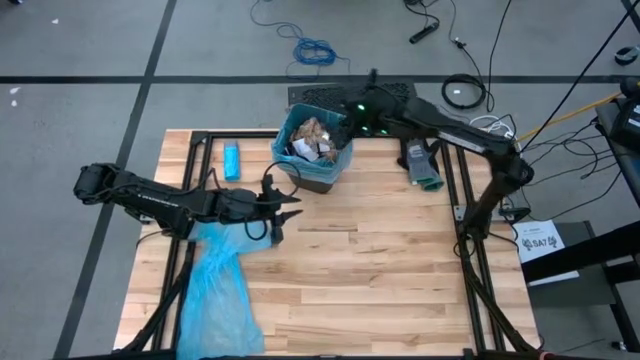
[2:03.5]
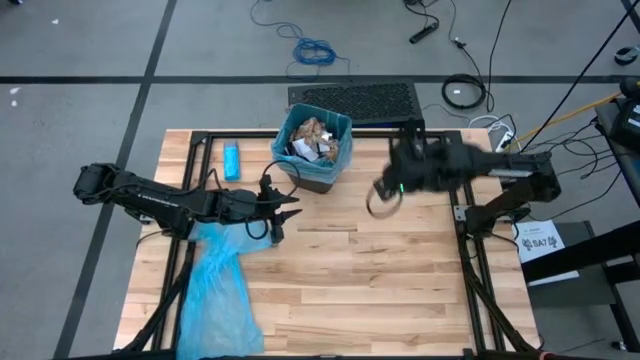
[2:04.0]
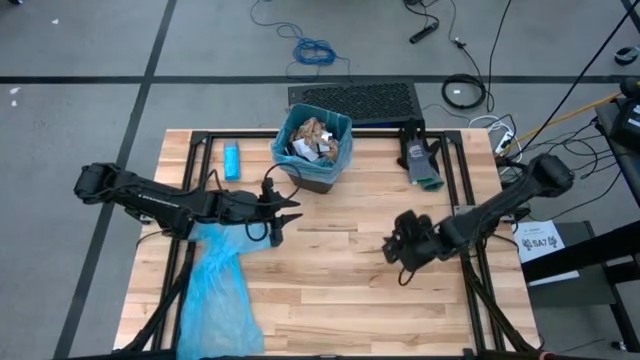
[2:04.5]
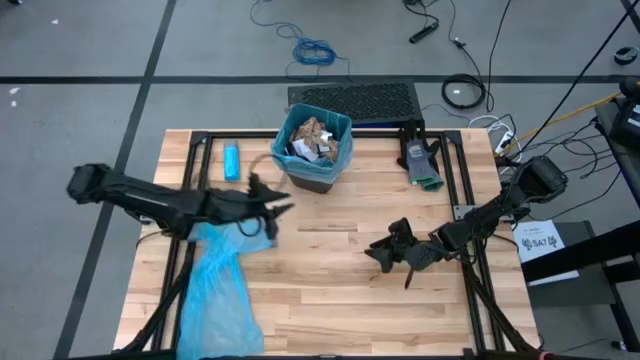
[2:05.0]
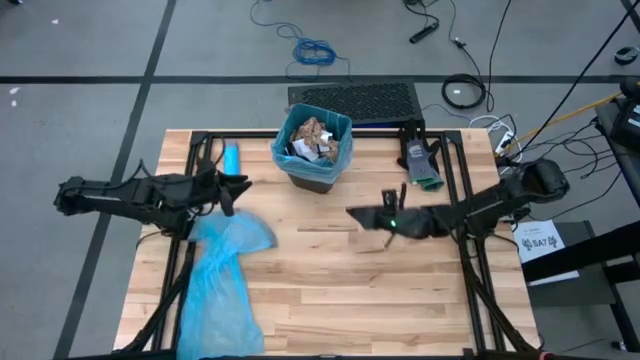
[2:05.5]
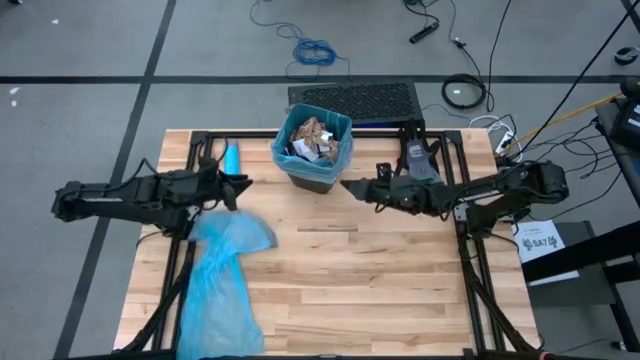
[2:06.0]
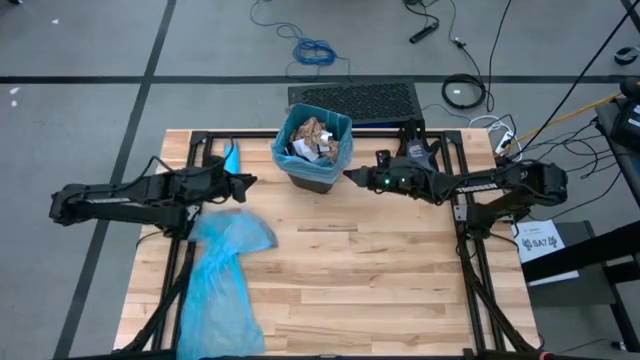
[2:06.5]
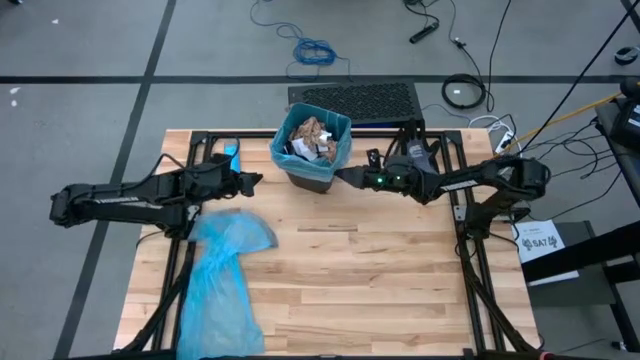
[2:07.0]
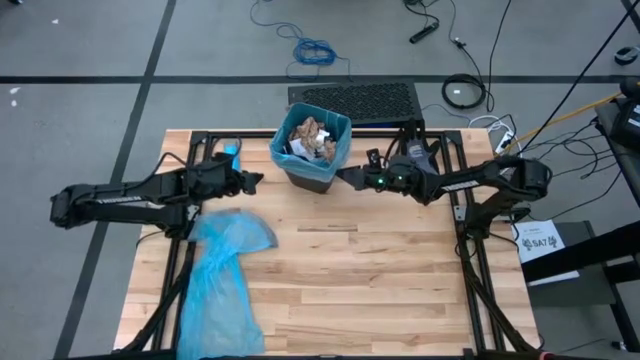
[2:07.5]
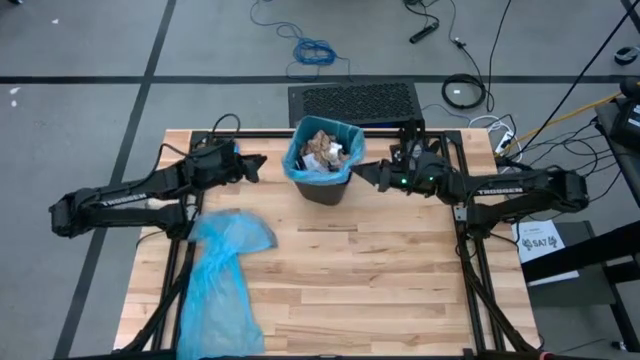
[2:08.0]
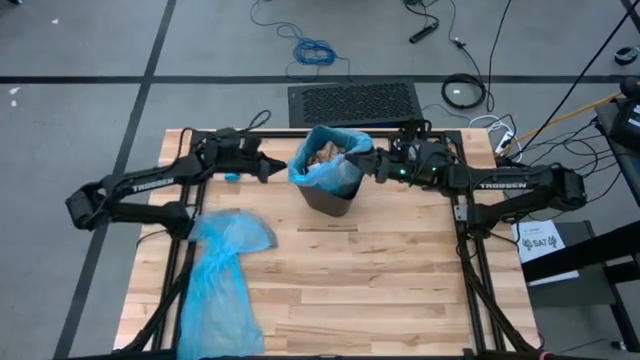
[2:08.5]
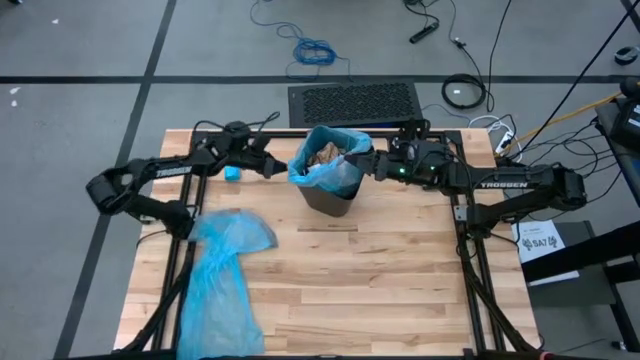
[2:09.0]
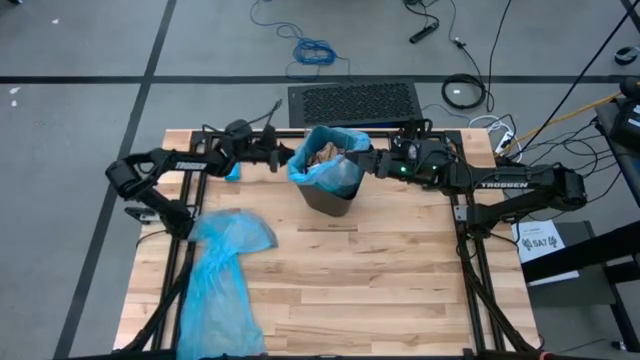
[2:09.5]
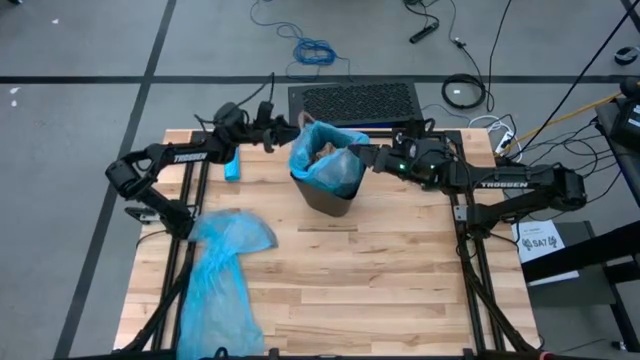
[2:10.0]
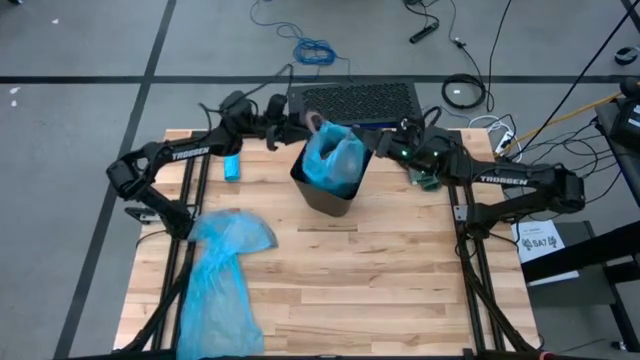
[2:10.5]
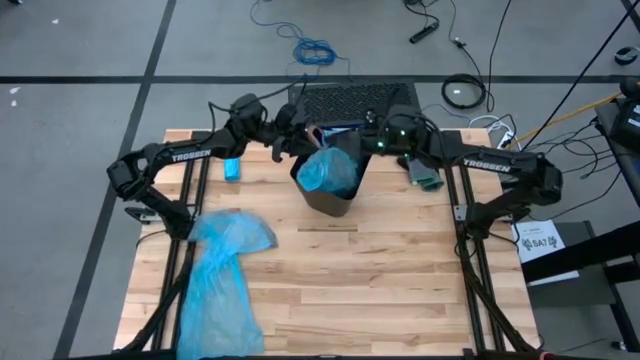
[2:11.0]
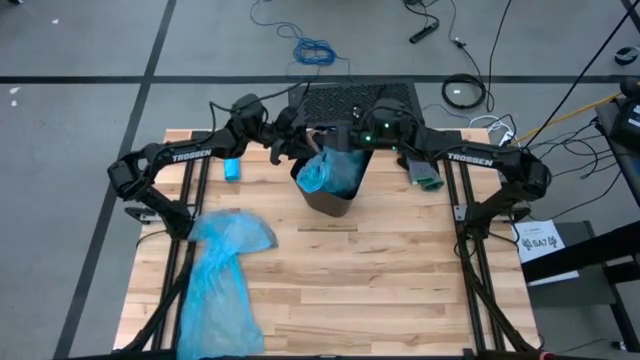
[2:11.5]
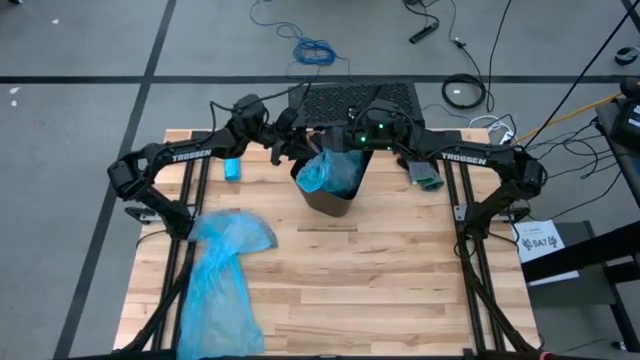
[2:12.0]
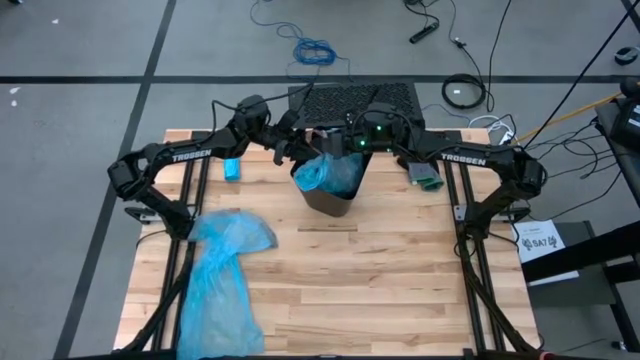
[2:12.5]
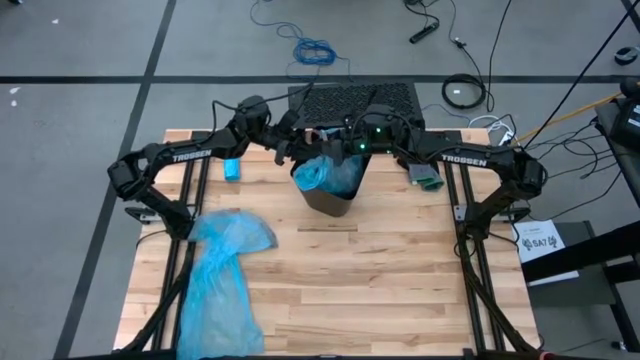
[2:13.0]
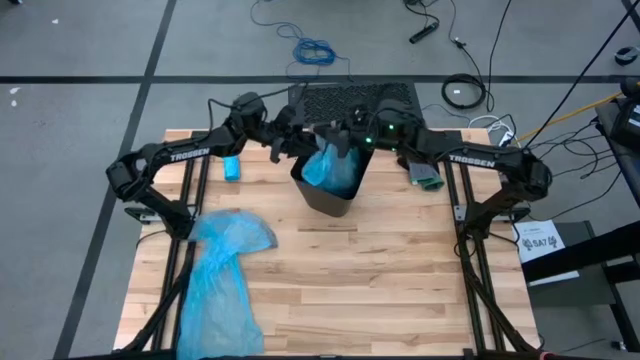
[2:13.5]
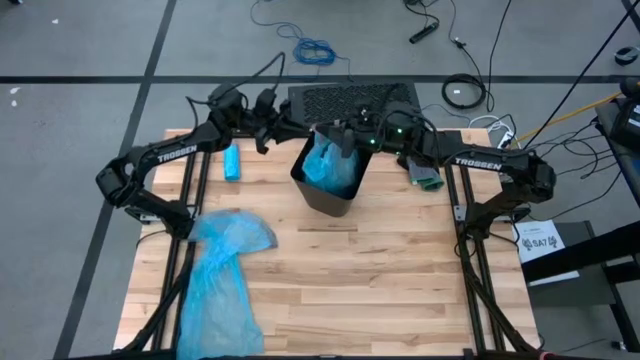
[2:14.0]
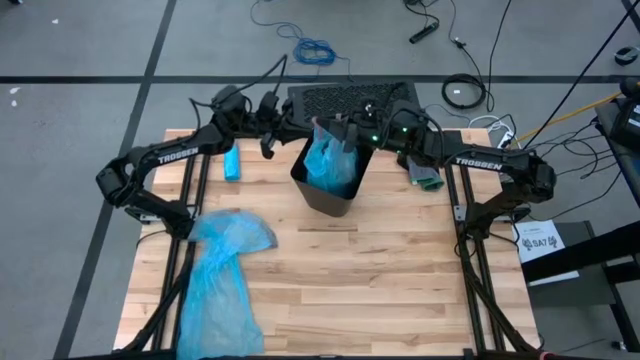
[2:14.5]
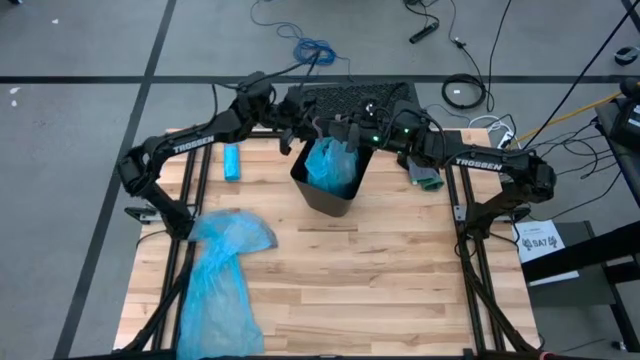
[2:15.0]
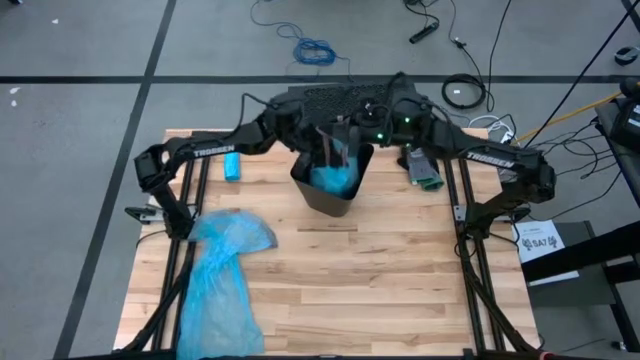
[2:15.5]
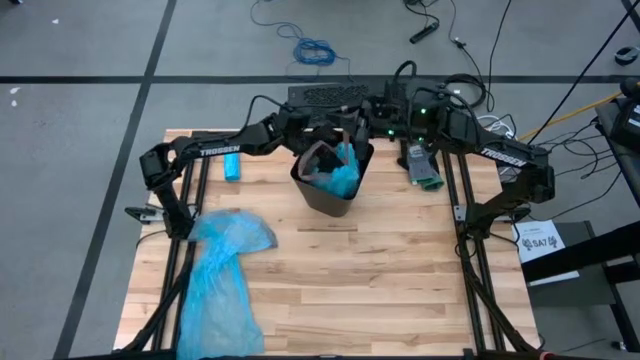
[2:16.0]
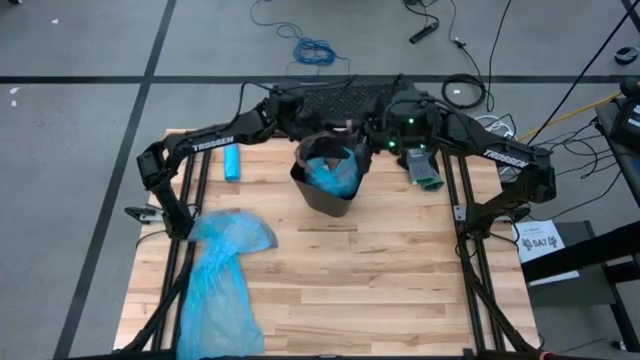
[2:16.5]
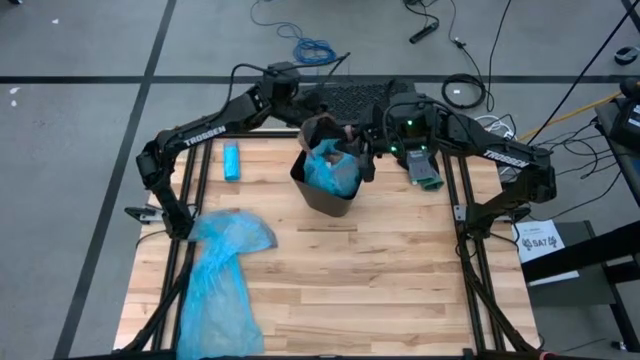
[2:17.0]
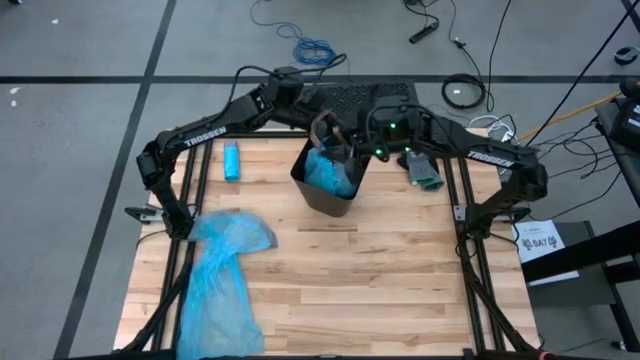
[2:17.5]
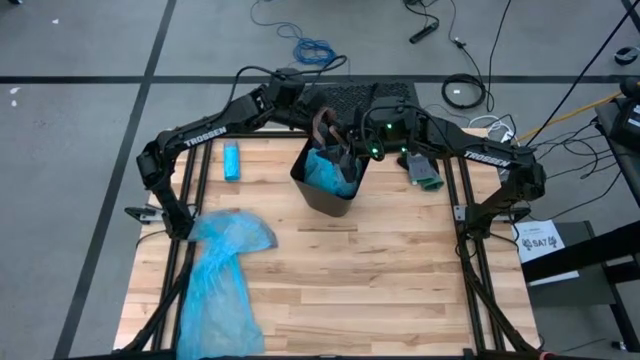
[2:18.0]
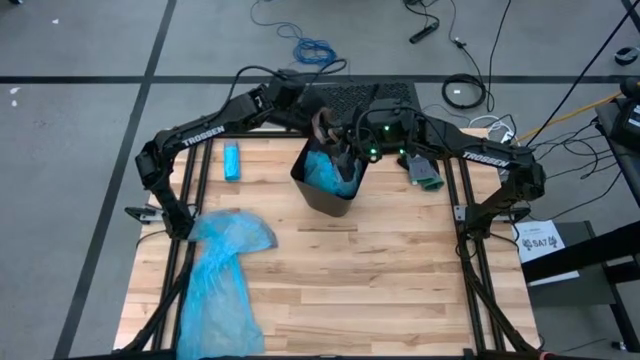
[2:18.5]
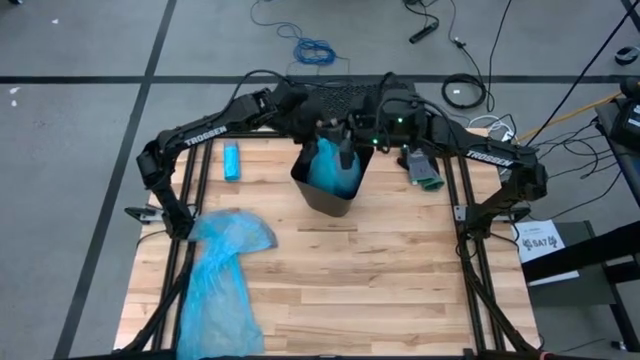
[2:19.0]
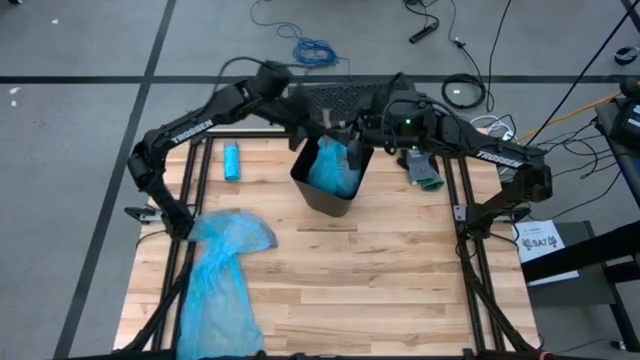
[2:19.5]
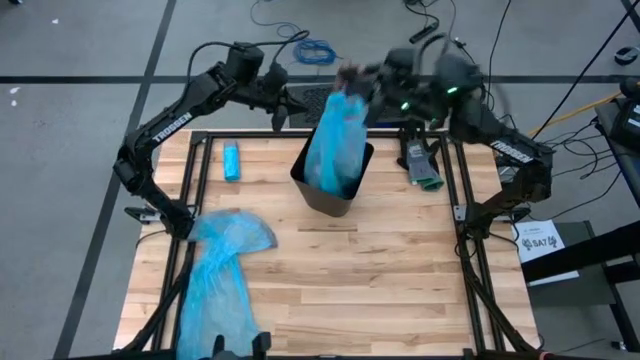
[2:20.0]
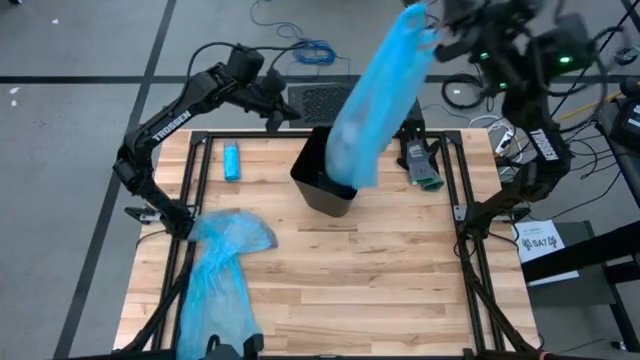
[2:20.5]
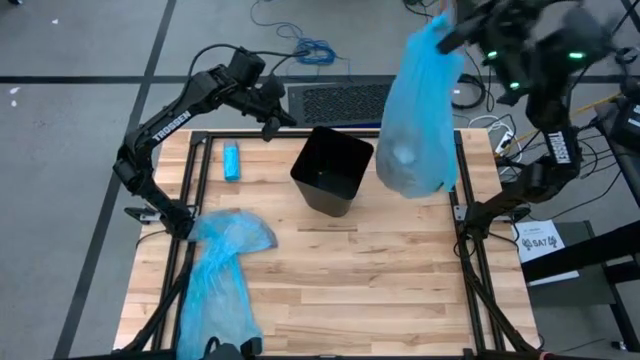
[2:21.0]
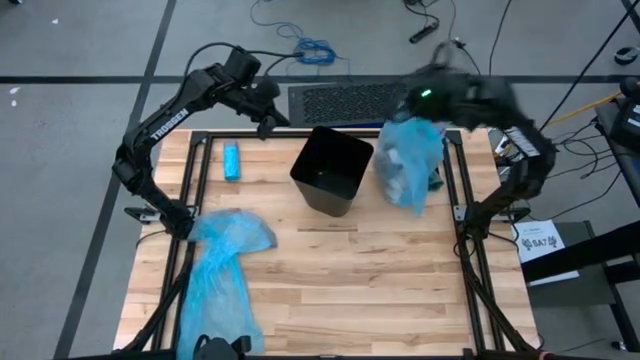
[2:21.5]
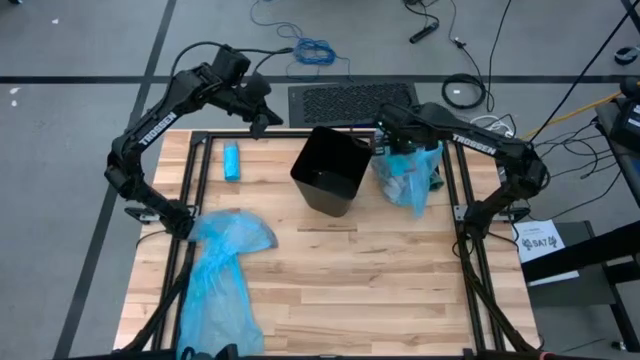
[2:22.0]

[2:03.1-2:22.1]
Task: place trash/remove bag and relplace
Remove the blue trash bag from the black trash bin

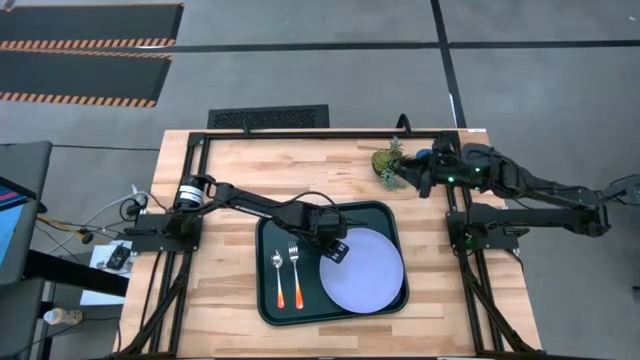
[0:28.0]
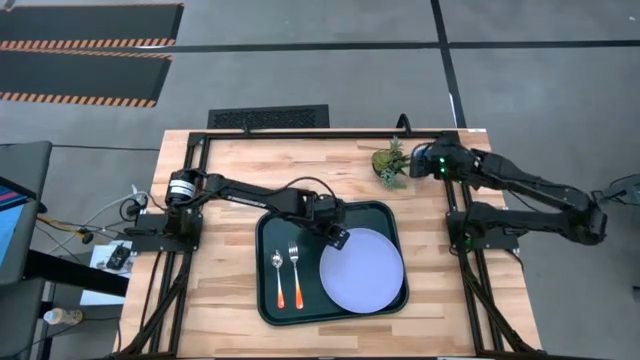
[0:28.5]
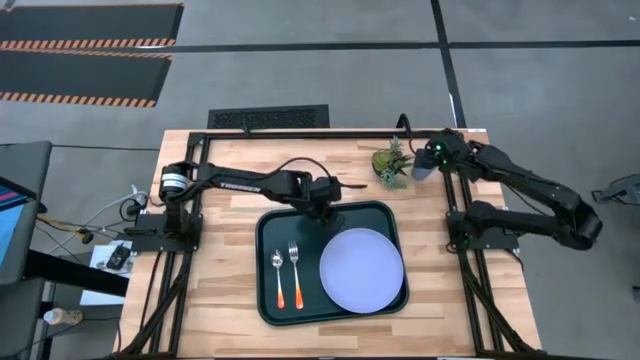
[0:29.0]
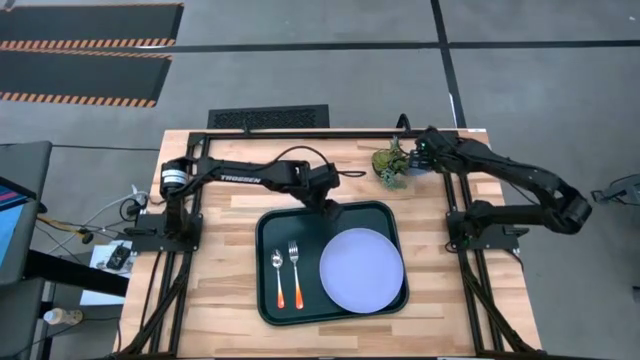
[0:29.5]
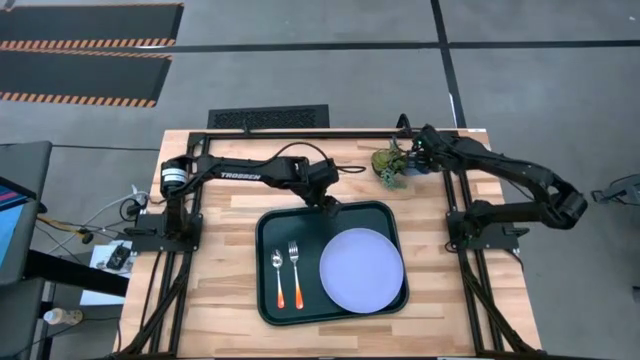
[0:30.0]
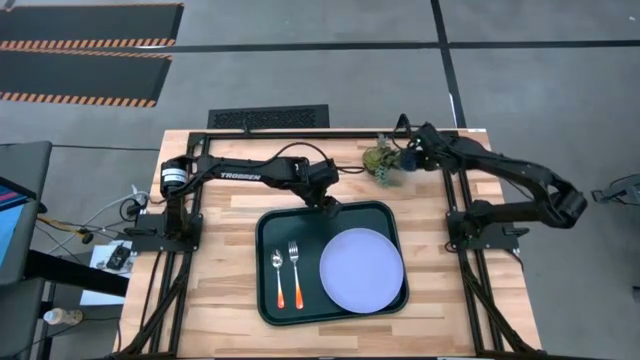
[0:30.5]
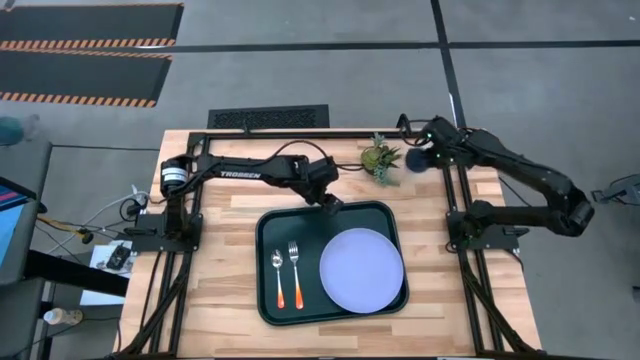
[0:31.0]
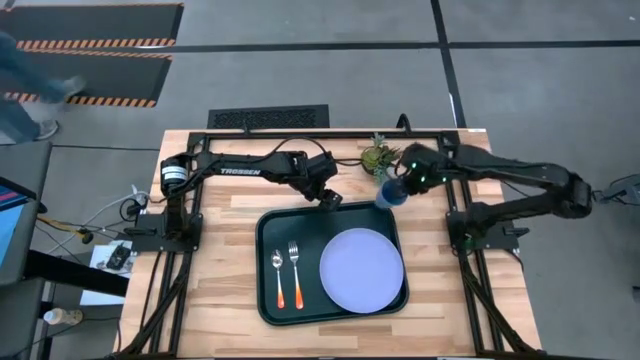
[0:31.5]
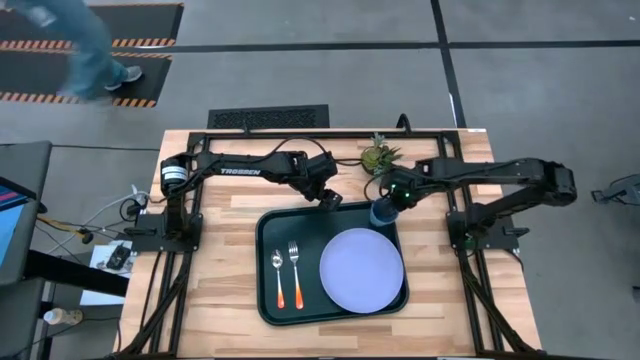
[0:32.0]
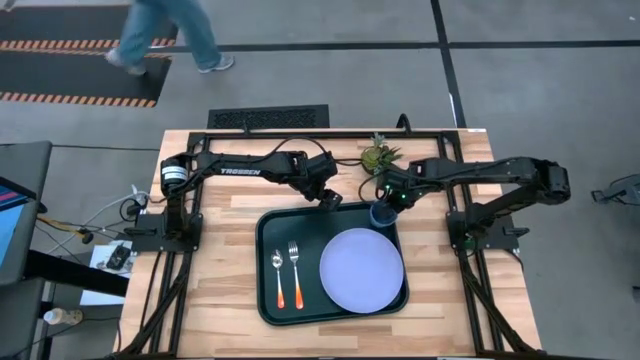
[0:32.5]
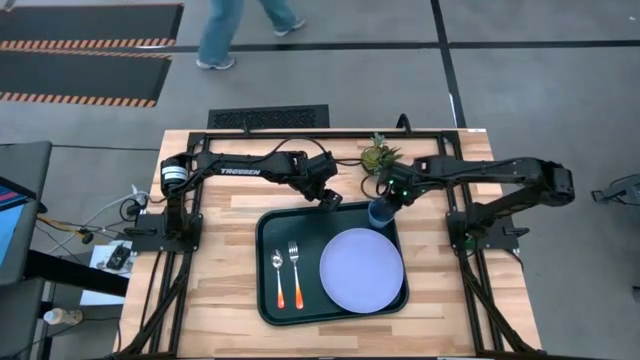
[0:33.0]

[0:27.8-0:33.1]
Task: Pick and place plate/cup/fork/spoon on tray
Put the blue cup on the black tray to the top right of the plate
